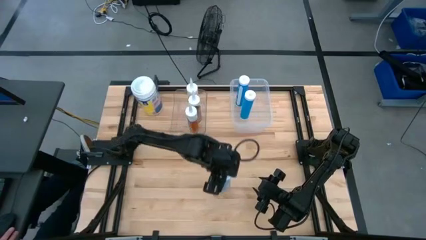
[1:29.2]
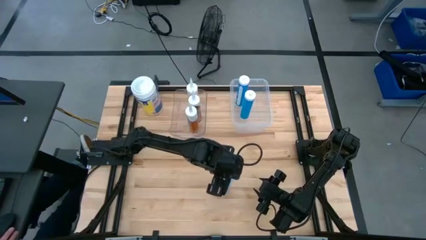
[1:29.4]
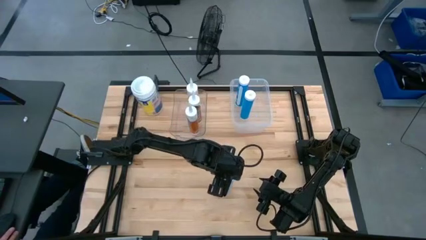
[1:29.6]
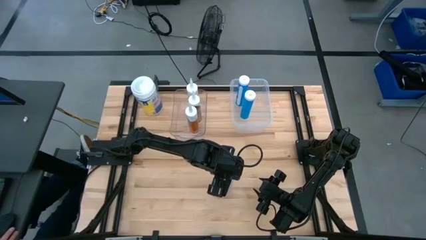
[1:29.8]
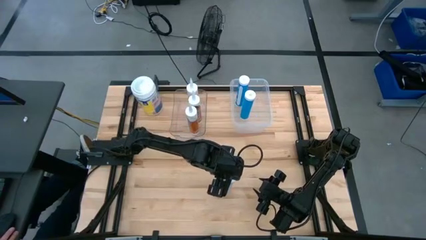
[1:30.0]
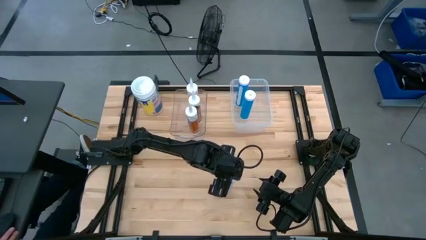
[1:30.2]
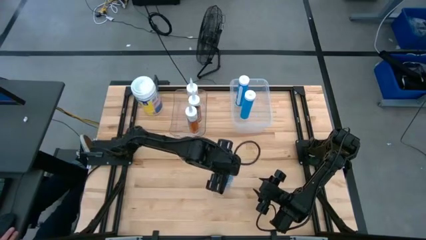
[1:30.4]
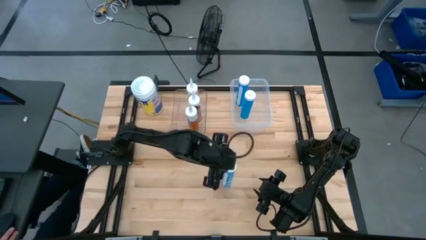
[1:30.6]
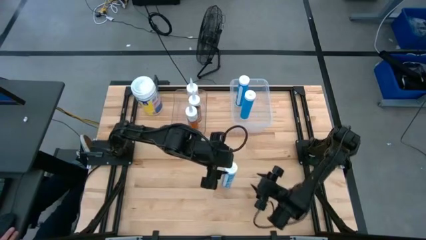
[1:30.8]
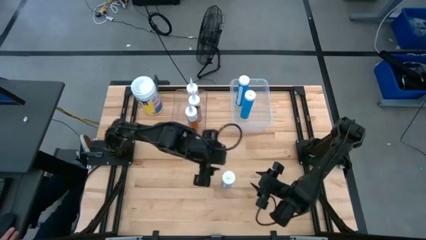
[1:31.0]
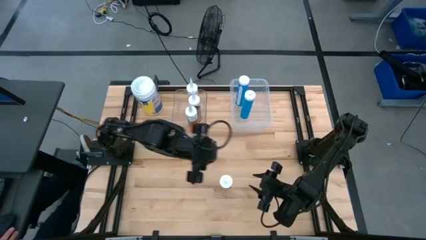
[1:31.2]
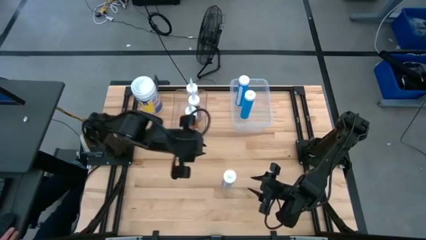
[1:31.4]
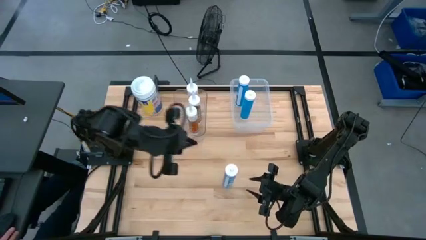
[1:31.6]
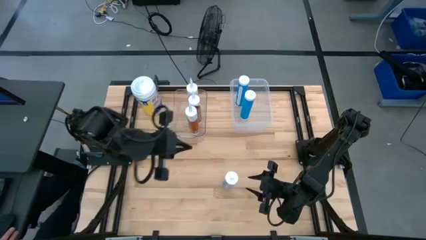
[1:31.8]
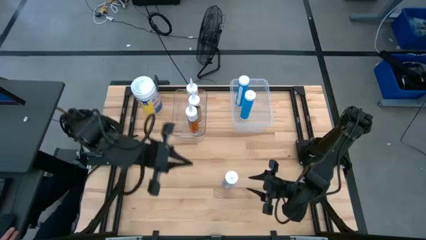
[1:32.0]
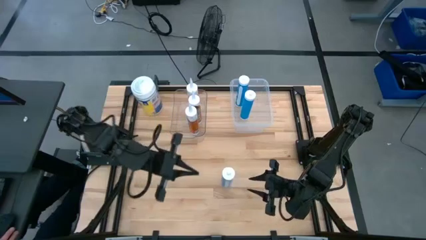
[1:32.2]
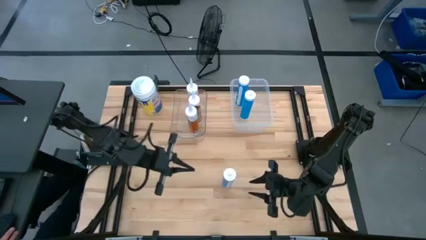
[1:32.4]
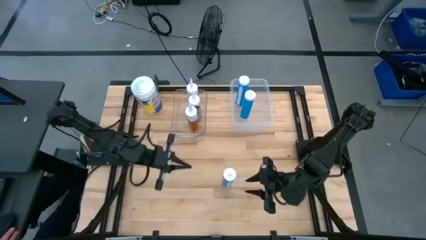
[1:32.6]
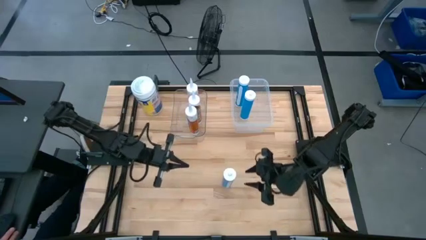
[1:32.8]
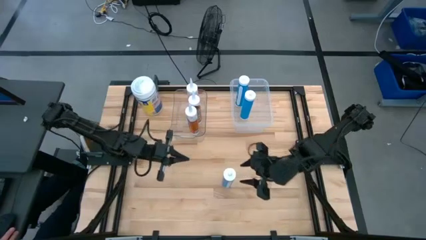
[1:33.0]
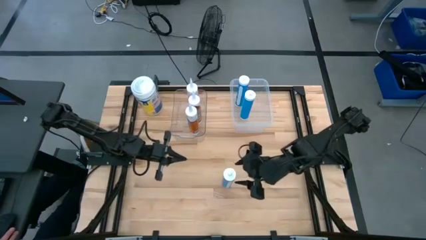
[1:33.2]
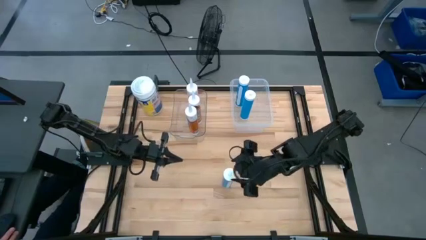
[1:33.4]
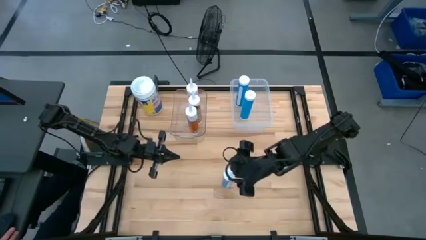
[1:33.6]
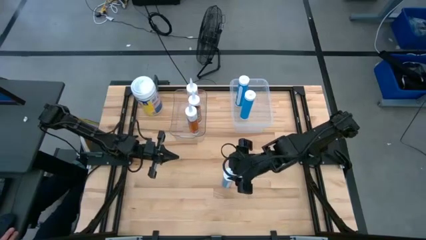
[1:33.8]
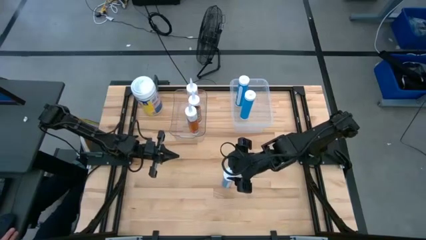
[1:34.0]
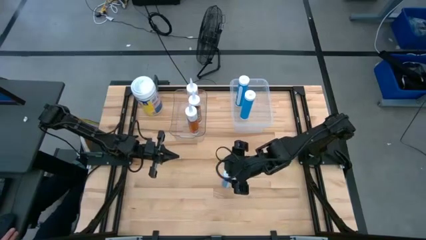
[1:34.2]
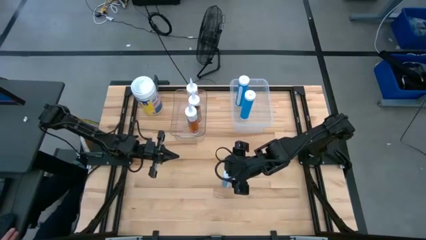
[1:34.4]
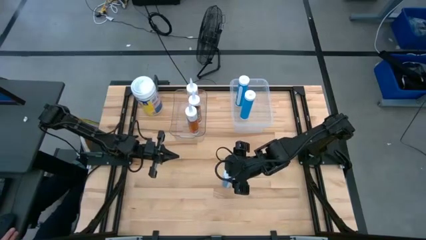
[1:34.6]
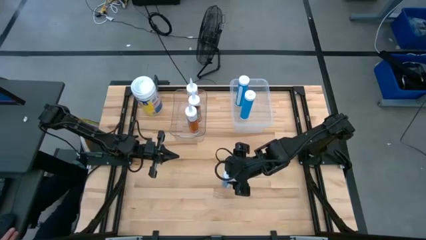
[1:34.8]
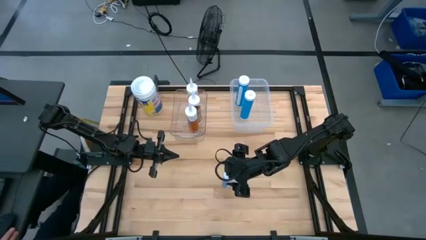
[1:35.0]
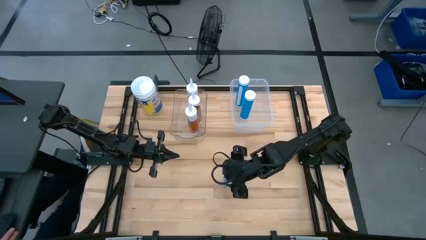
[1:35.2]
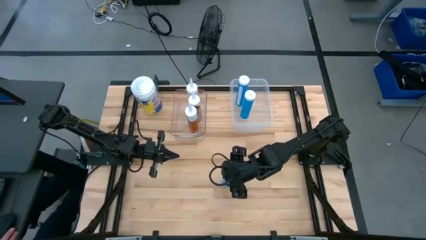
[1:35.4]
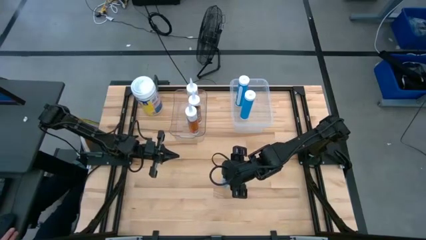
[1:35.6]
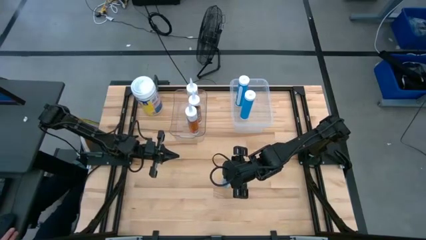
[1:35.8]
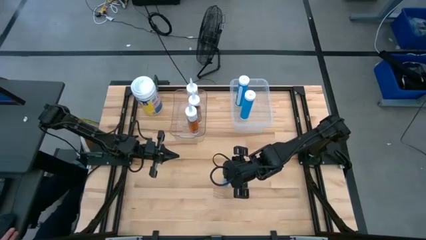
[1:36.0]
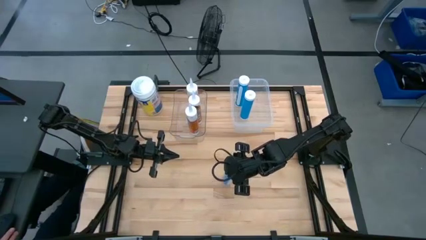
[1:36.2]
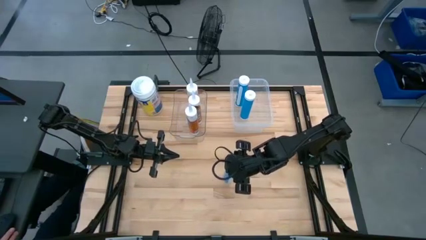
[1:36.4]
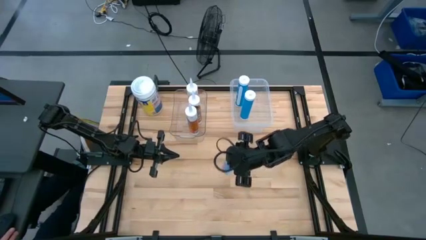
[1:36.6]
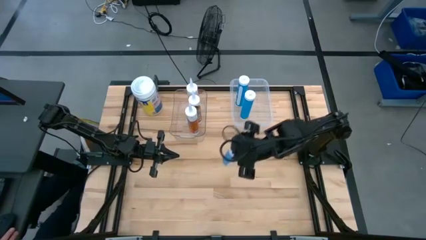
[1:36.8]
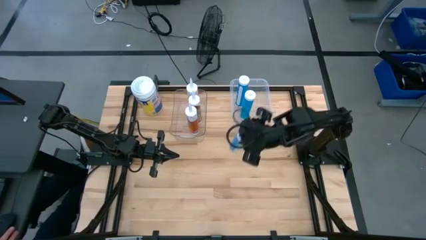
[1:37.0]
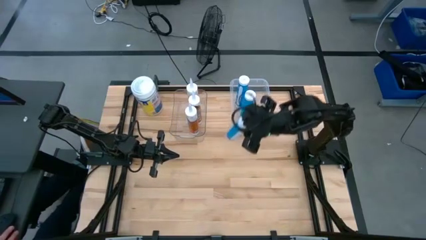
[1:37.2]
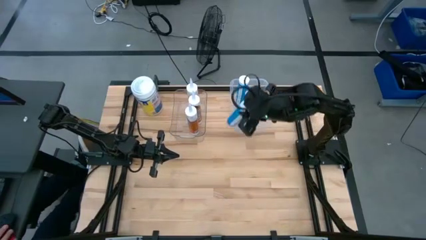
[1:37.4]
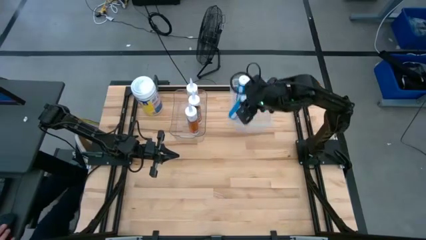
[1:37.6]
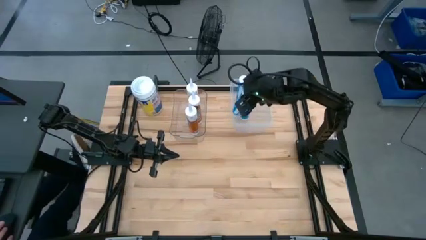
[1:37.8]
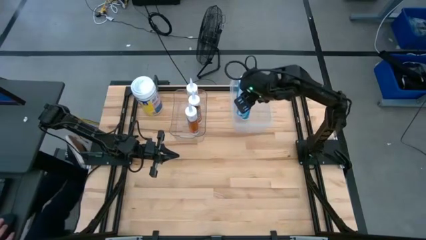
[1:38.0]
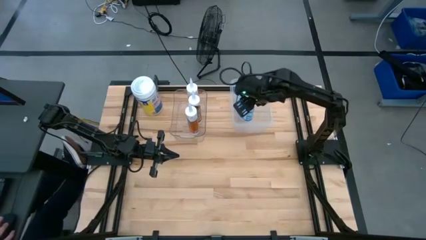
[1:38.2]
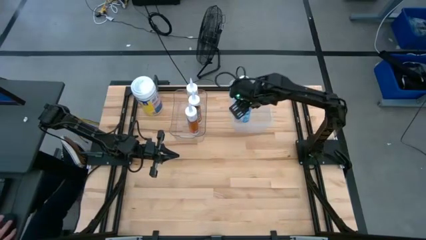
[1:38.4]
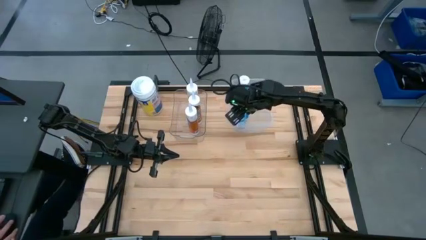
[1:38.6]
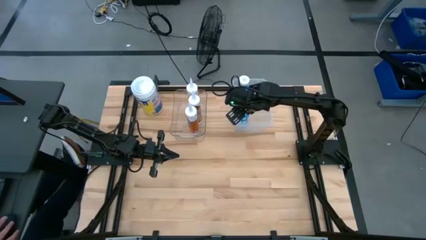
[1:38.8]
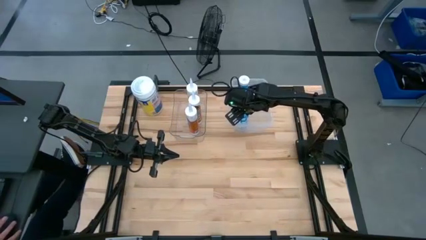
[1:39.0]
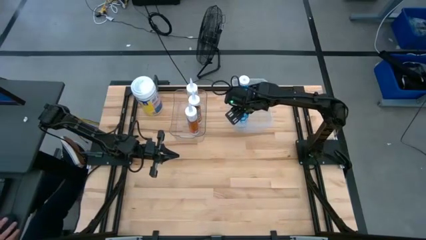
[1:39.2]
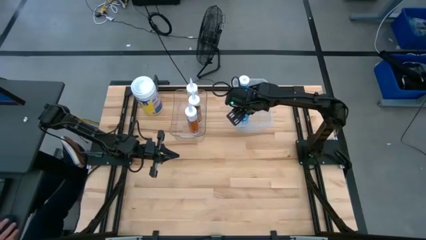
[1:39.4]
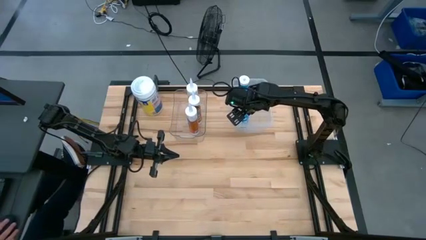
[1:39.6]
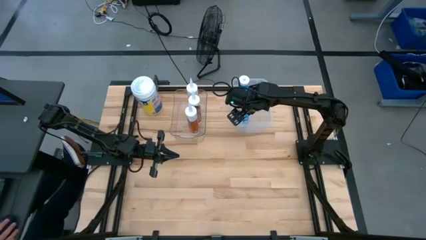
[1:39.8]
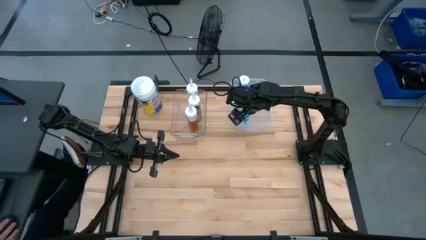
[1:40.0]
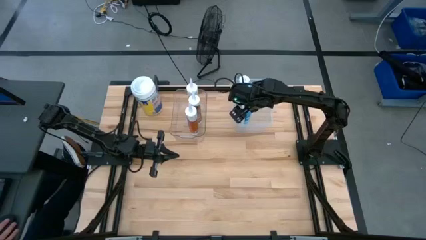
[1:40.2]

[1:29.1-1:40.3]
Task: Pick & place silicon tubes, Sealant and Lysol wipes
Put the blue sealant into the right transparent bin

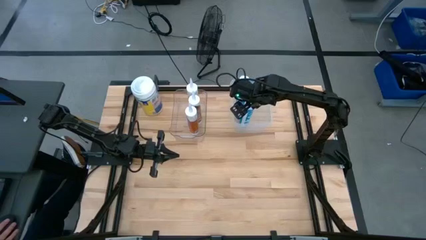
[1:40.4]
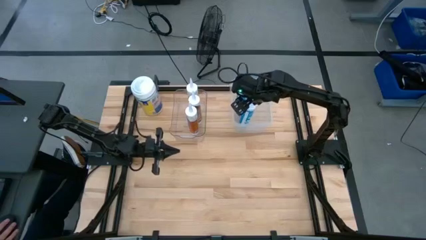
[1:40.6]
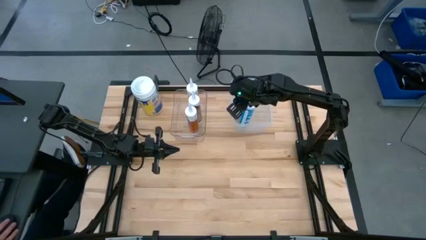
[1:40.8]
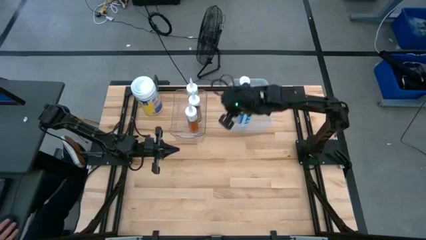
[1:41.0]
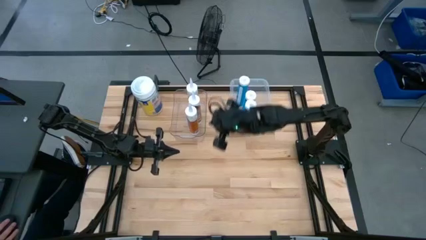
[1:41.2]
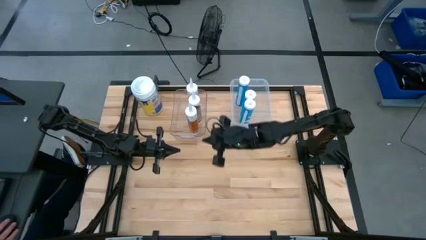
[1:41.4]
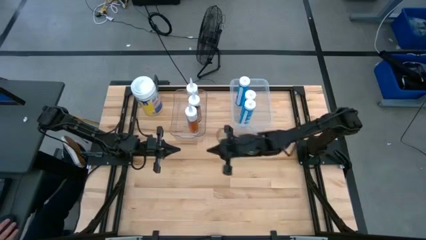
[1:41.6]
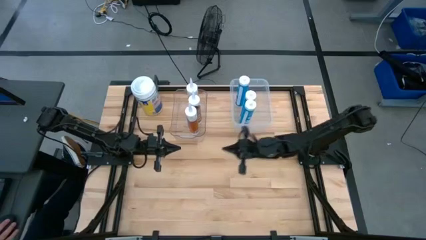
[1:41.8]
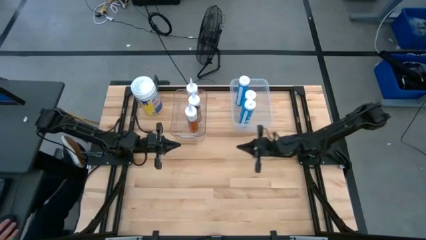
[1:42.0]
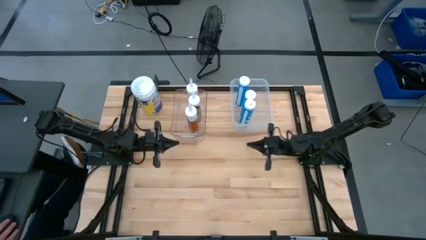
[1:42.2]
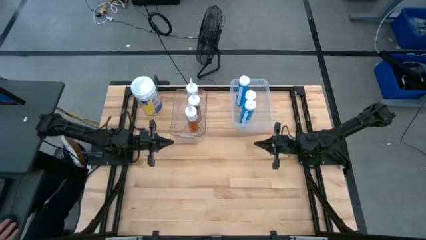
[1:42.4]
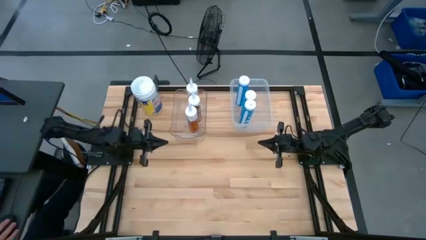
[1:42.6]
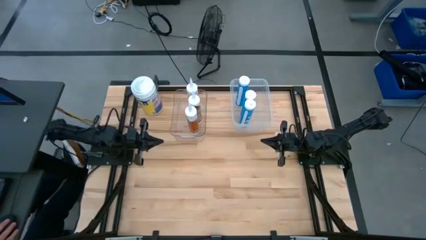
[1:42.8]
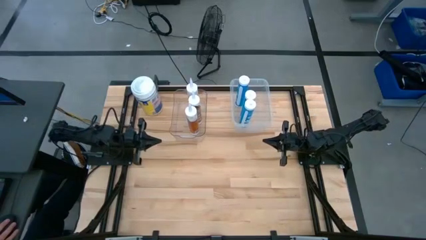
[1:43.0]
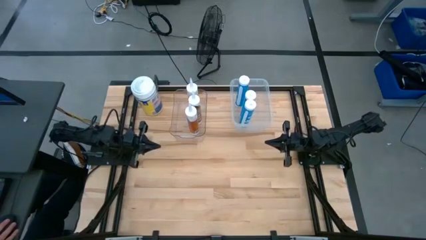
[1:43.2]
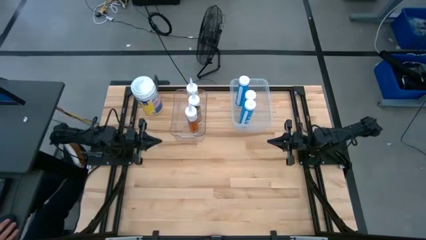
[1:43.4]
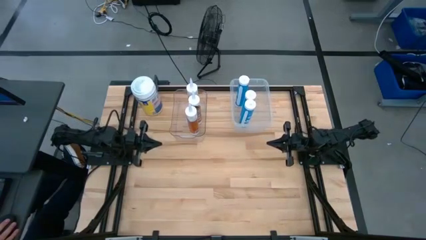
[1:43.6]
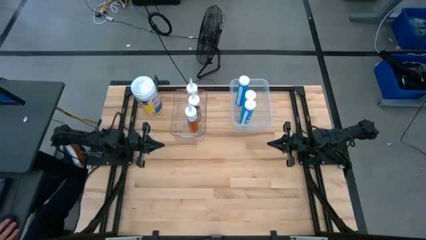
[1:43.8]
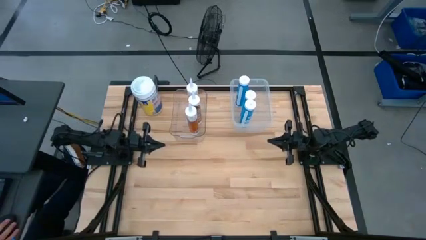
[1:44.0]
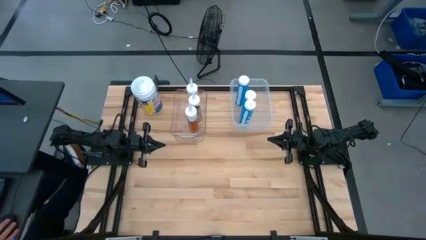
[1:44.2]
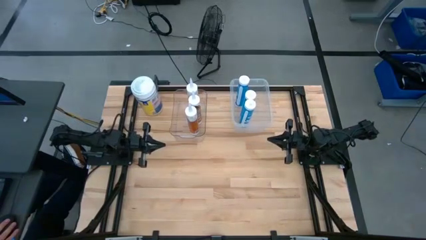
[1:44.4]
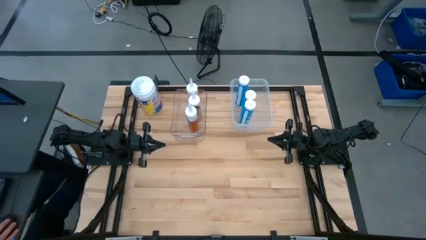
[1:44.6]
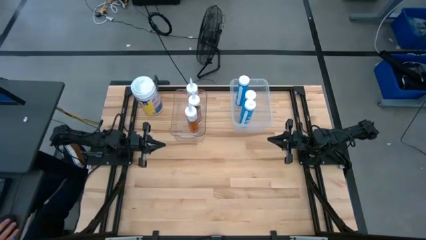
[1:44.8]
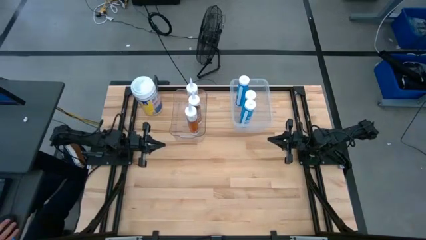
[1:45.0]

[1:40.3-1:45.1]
Return to Home Position
